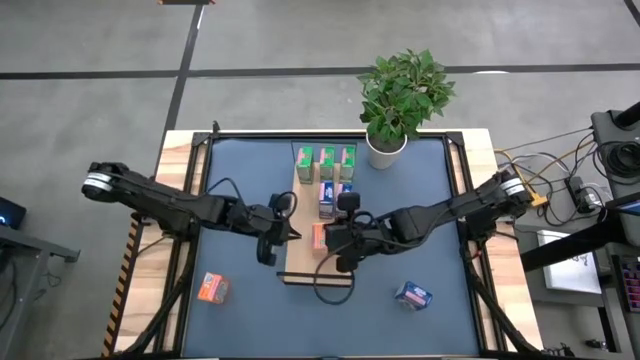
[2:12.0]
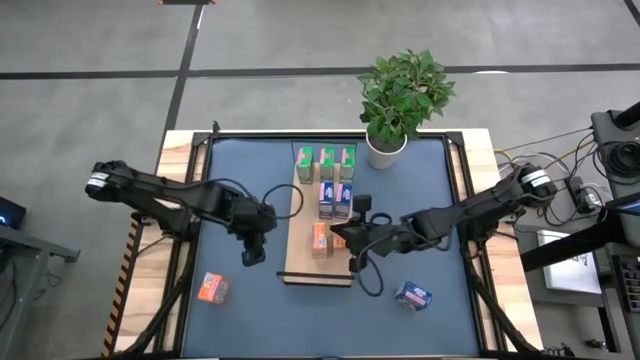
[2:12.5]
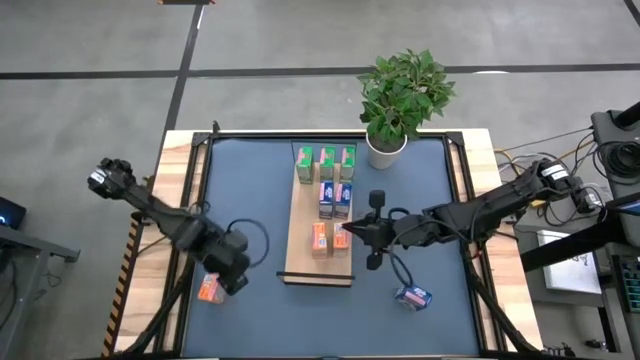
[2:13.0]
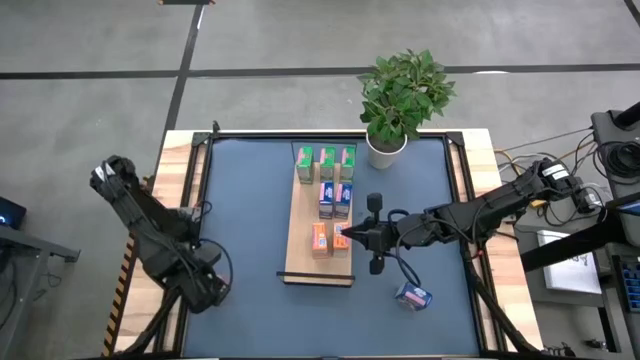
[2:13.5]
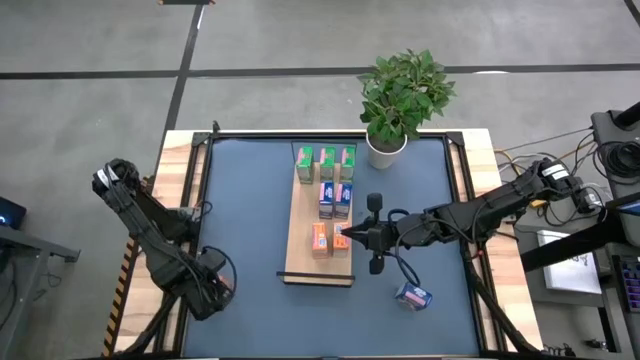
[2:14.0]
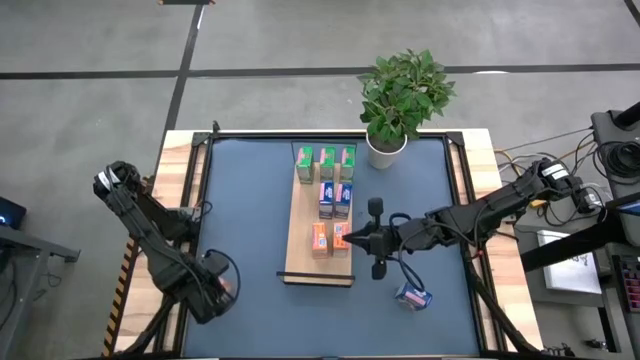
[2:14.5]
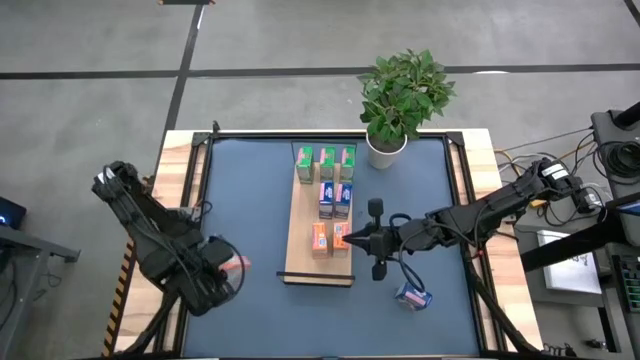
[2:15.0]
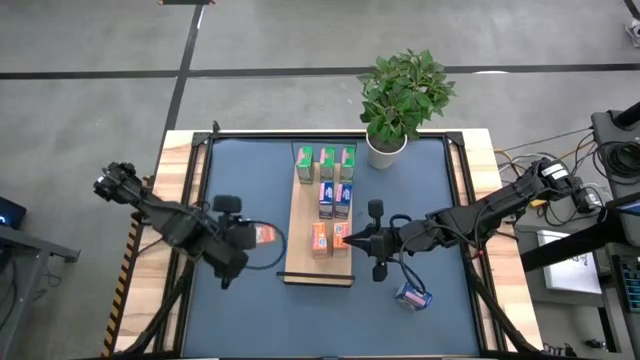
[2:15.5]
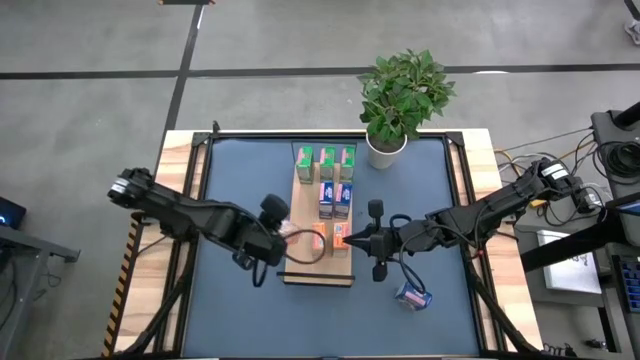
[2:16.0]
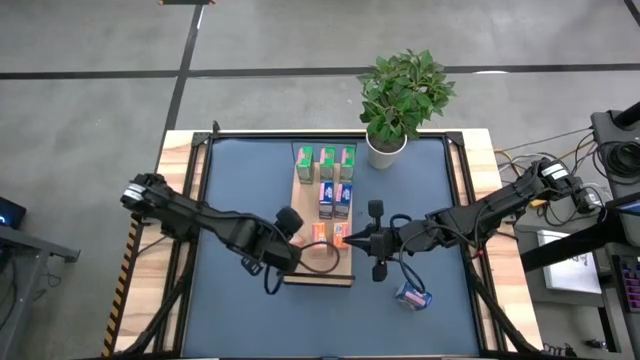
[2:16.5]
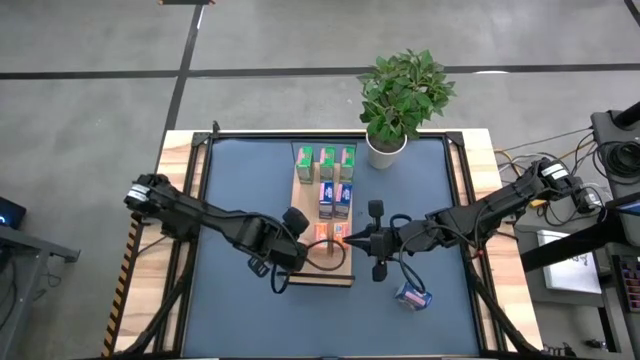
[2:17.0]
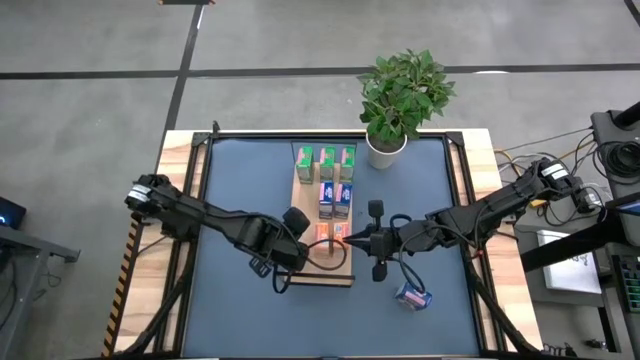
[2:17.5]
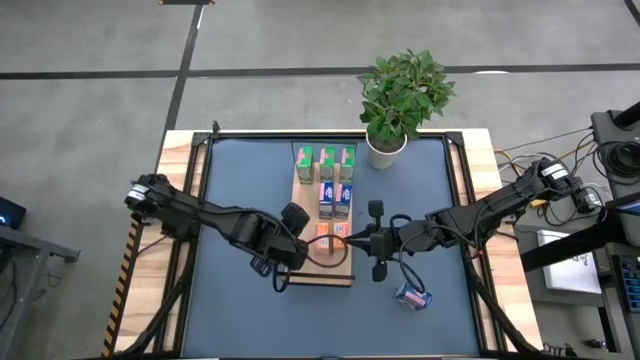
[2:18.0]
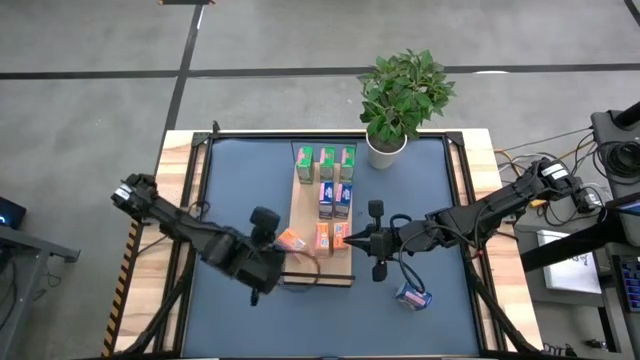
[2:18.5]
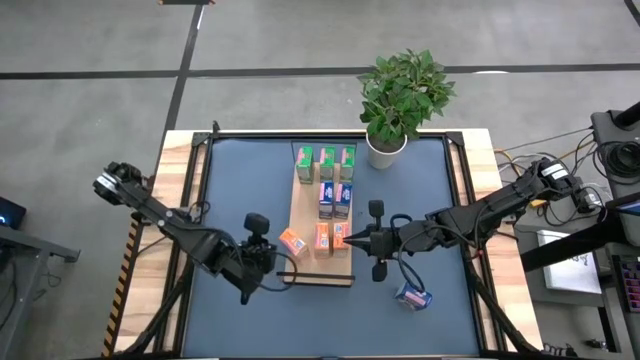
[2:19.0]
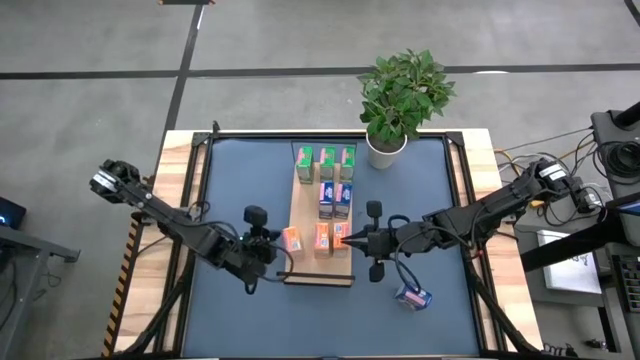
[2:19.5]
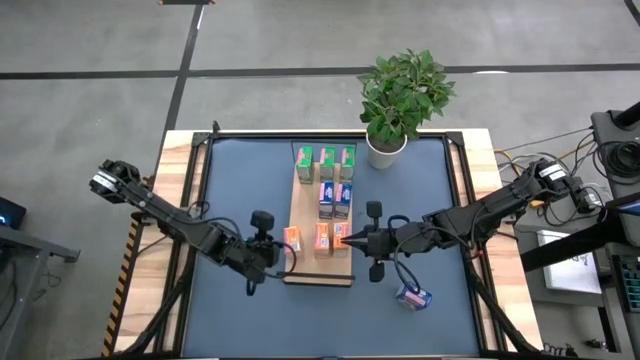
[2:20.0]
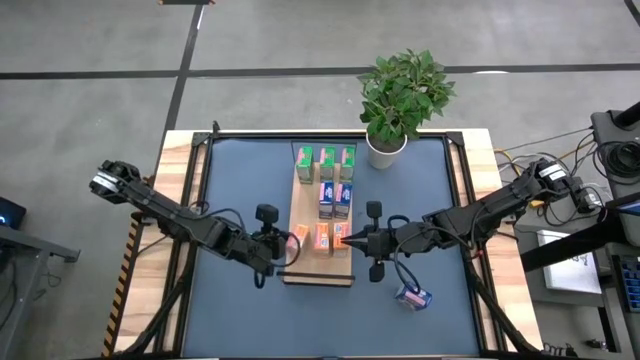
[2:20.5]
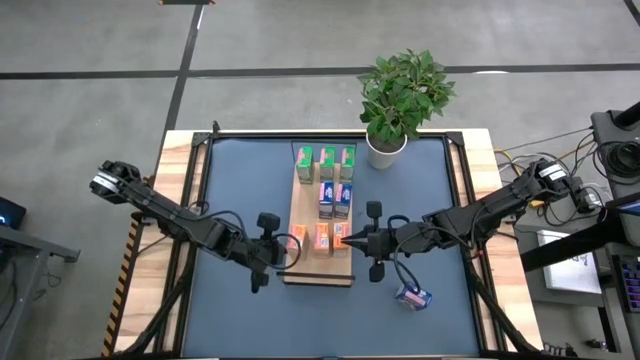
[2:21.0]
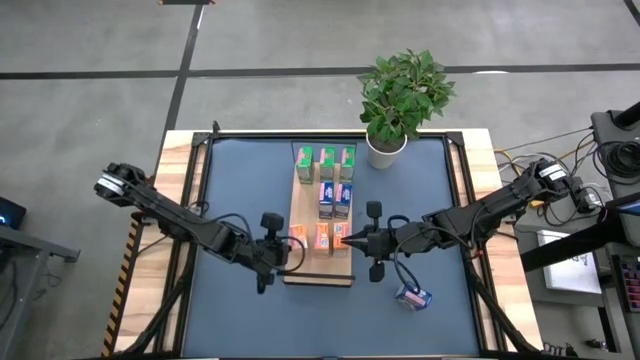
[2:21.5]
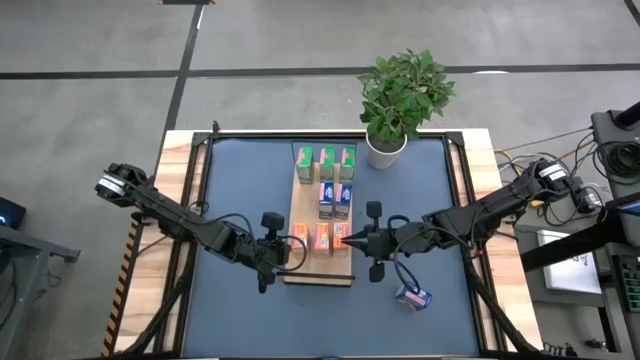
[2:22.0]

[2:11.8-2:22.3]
Task: Stack cereal on shelf
Put the orange cereal box on the shelf aligned with the other orange cereal box

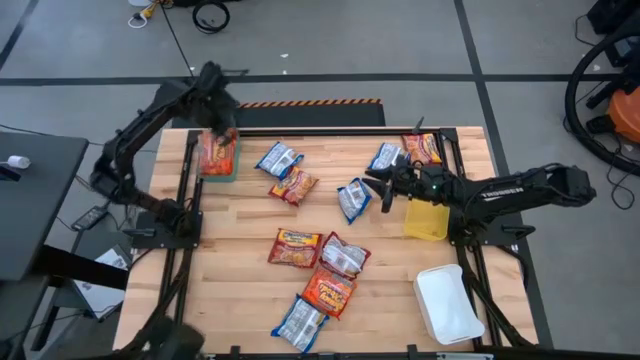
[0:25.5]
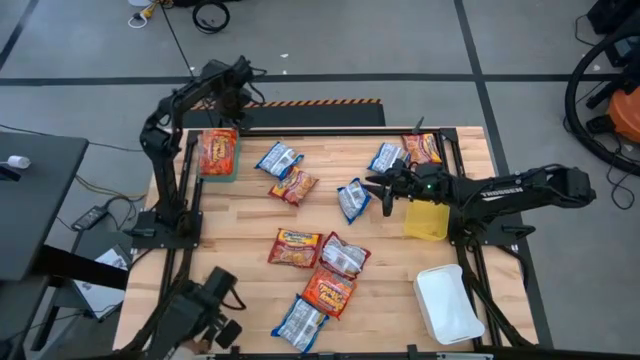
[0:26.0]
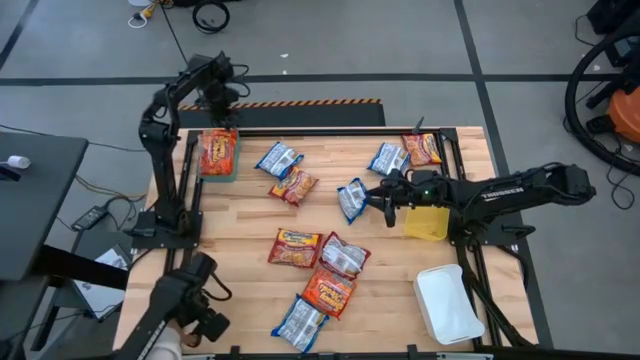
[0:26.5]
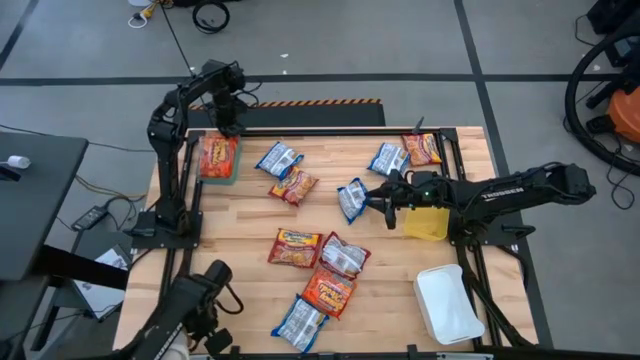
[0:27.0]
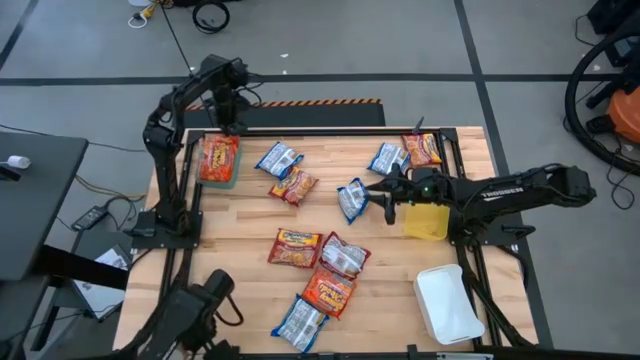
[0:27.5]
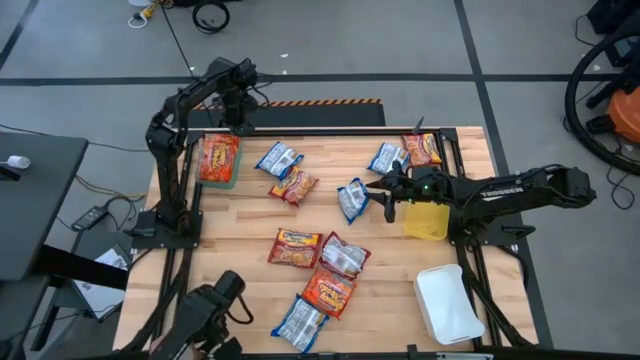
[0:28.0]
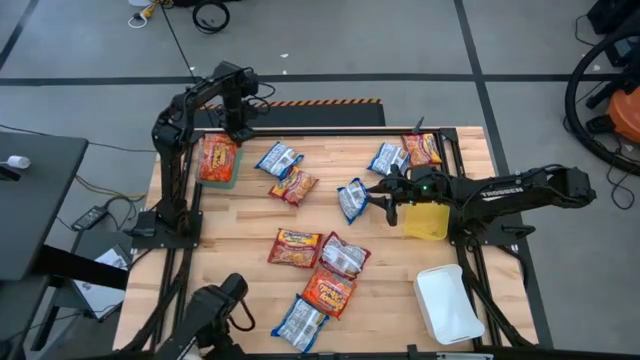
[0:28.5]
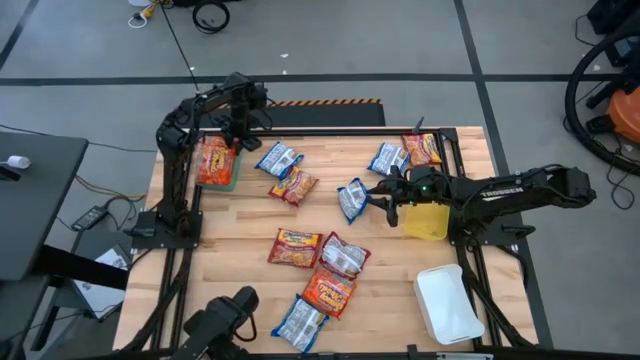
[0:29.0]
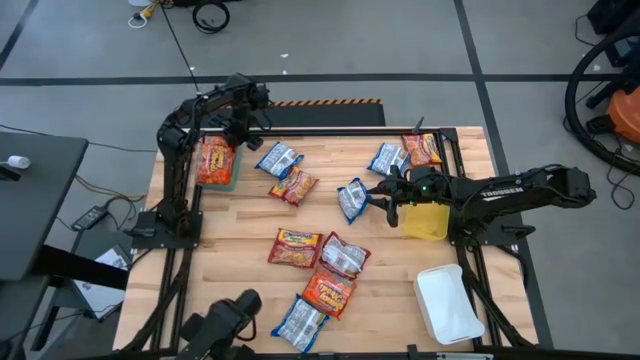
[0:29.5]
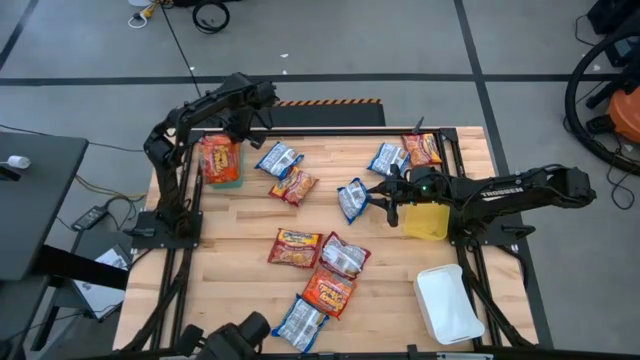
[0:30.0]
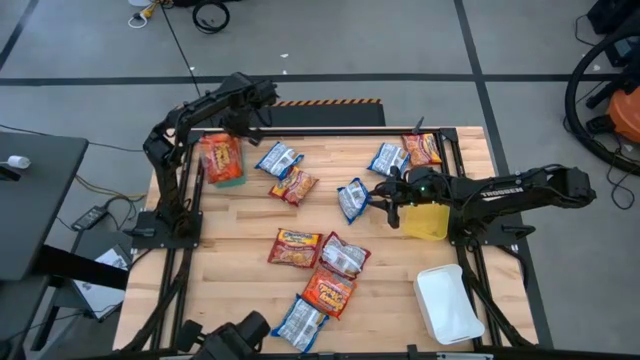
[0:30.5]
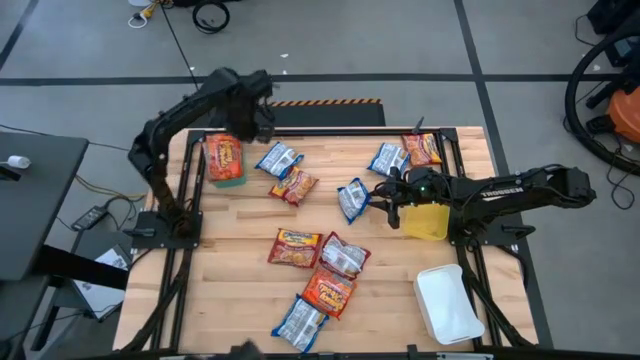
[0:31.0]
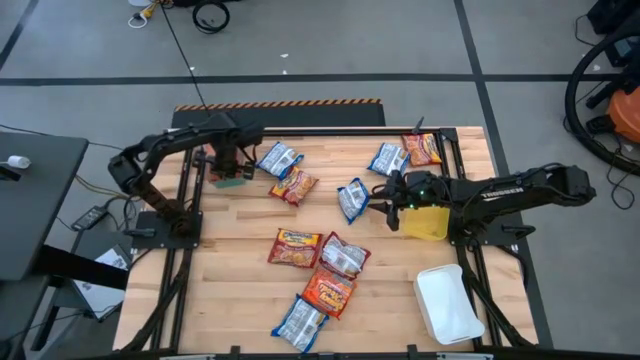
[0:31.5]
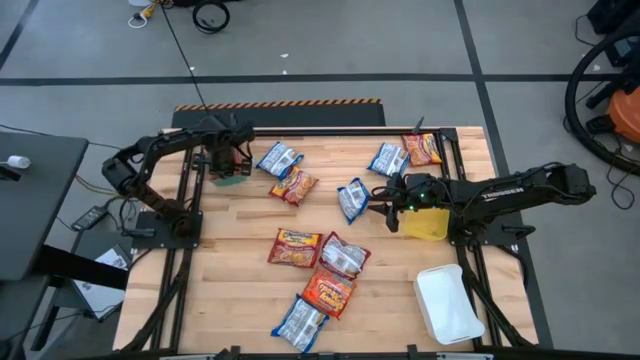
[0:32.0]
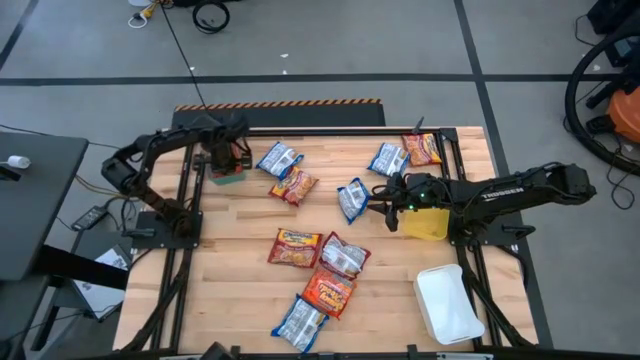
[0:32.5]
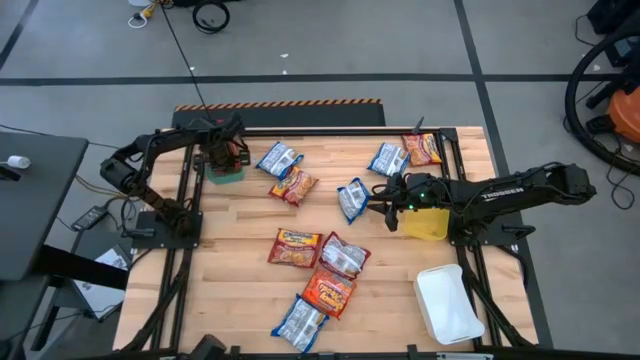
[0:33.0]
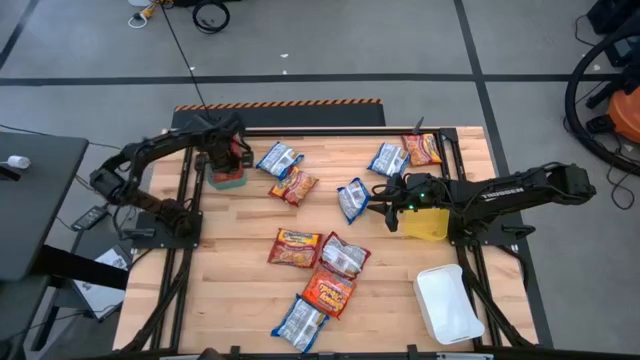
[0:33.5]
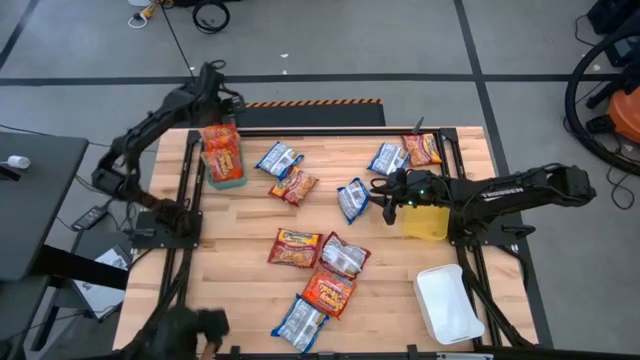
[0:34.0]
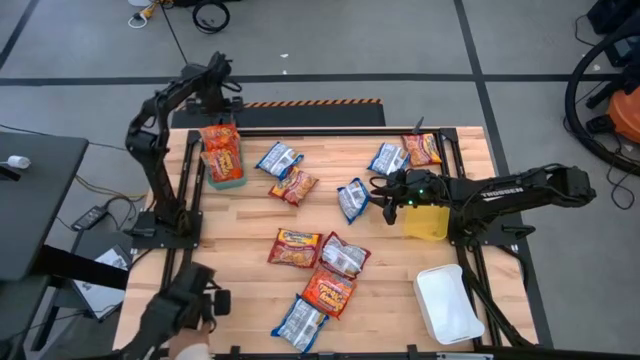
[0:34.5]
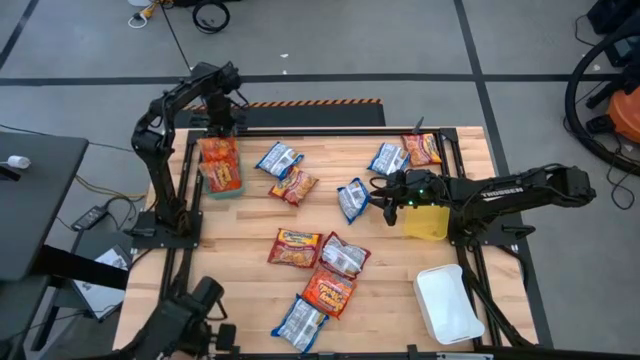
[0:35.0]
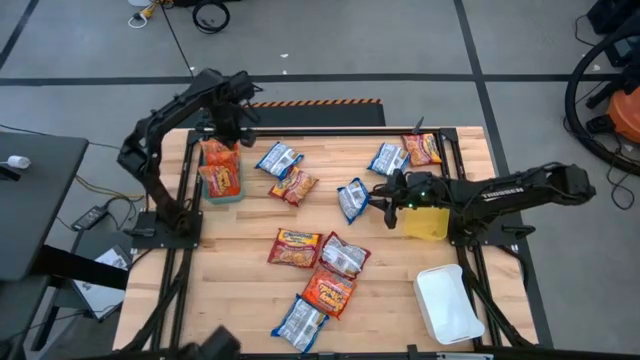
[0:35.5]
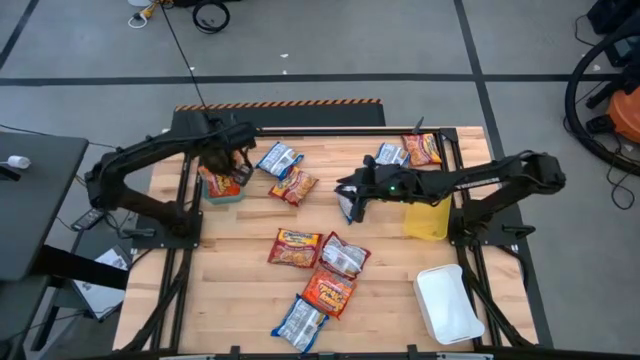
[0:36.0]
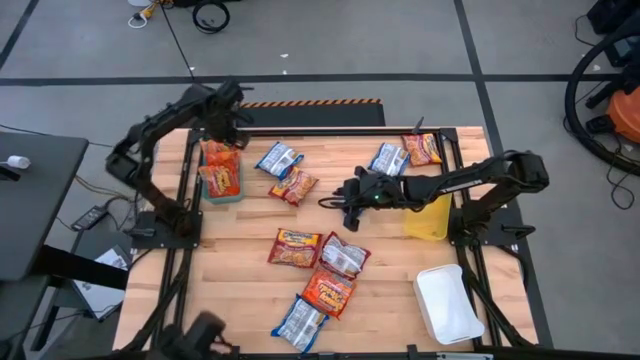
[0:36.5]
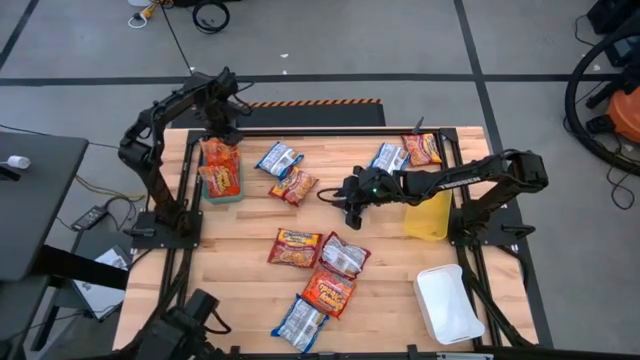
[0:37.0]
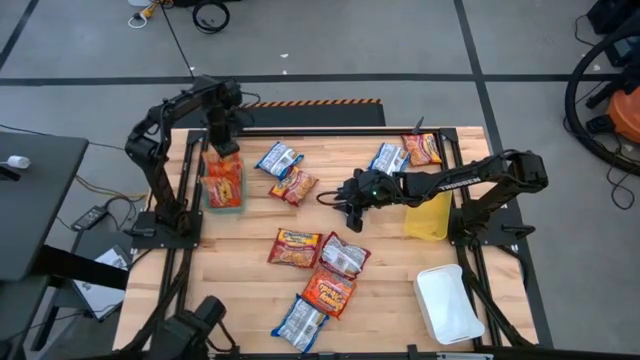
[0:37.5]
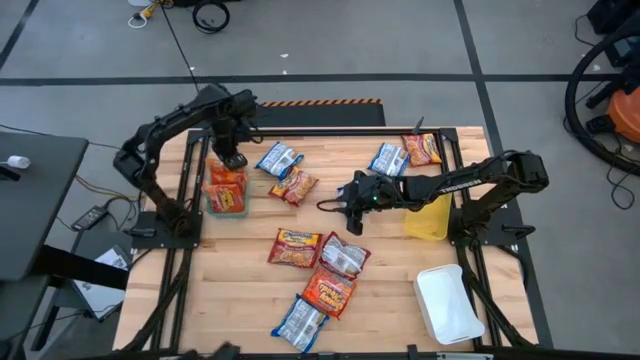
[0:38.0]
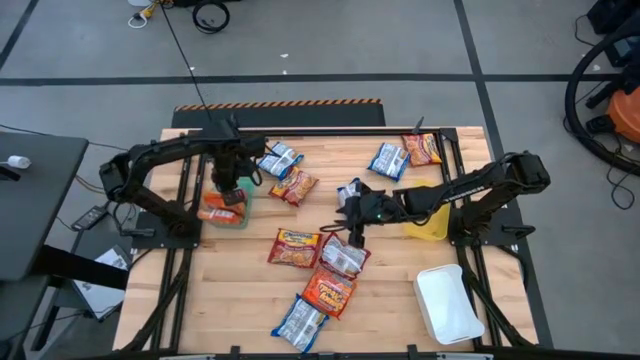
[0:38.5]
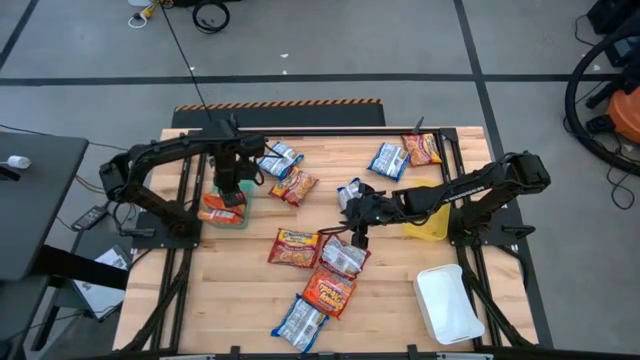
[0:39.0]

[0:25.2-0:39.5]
Task: Sort Maruchan noodles
Adjust the orange noodle pack
